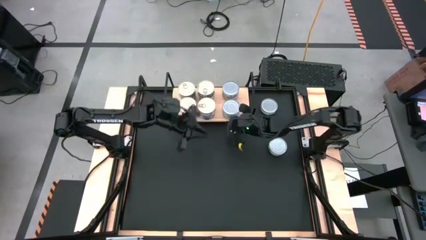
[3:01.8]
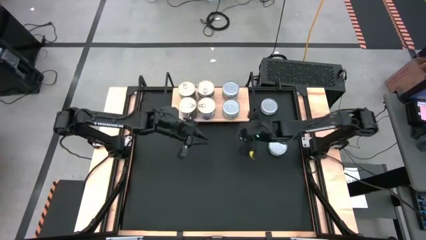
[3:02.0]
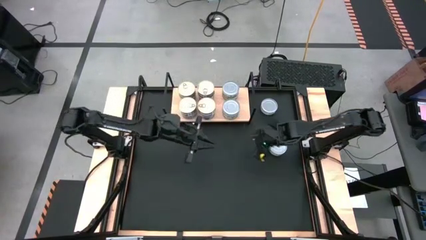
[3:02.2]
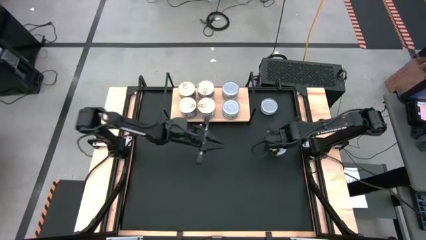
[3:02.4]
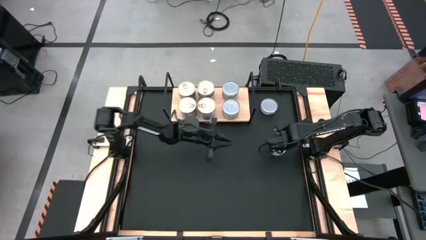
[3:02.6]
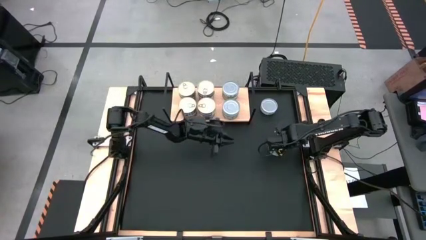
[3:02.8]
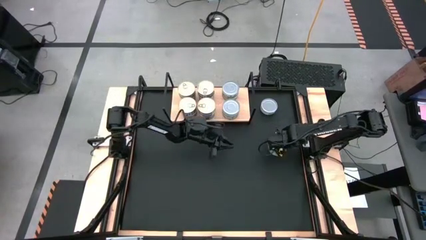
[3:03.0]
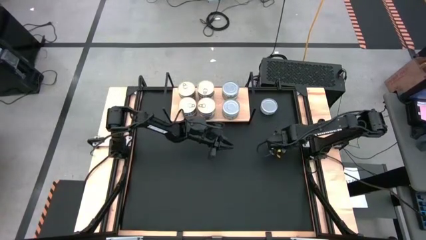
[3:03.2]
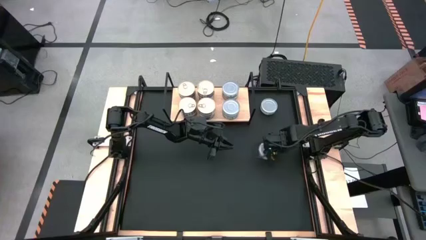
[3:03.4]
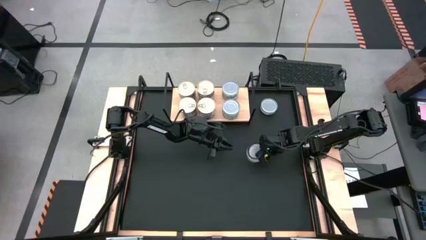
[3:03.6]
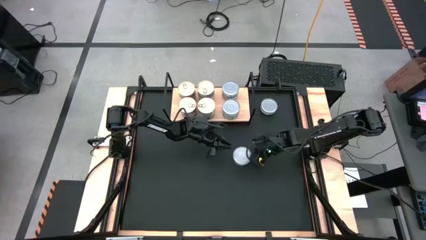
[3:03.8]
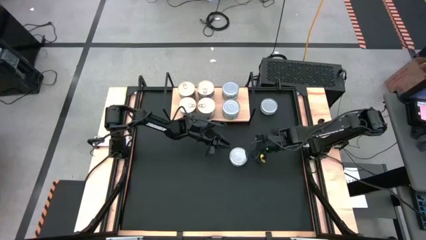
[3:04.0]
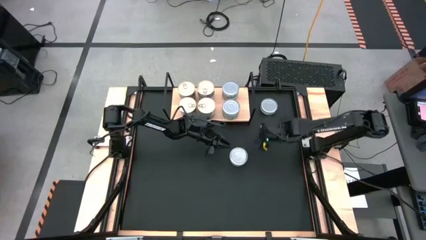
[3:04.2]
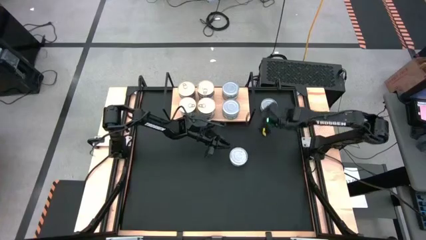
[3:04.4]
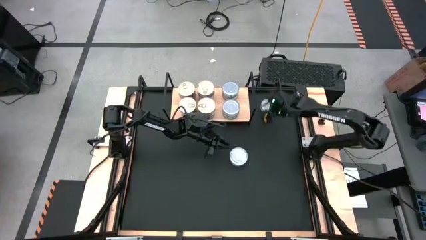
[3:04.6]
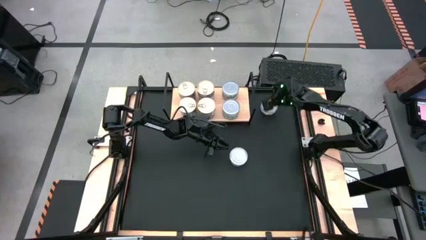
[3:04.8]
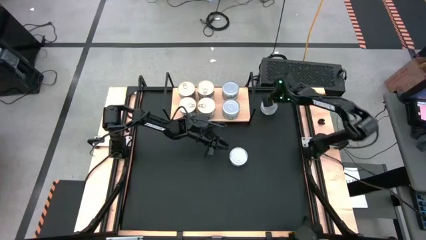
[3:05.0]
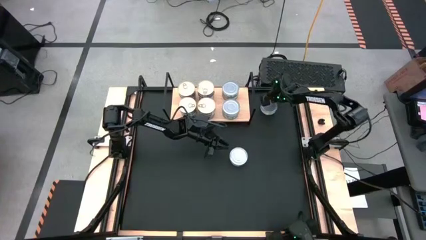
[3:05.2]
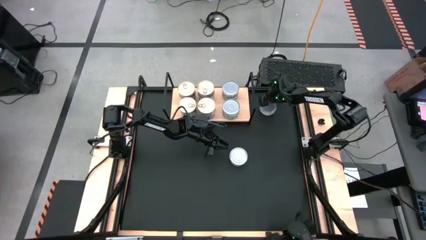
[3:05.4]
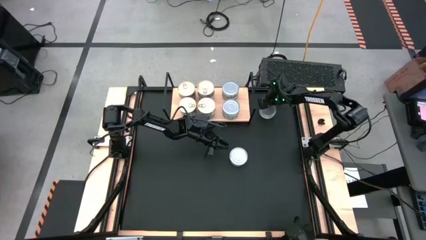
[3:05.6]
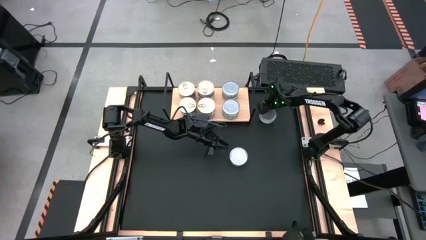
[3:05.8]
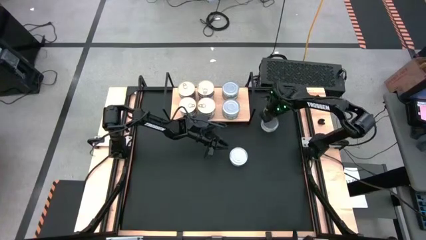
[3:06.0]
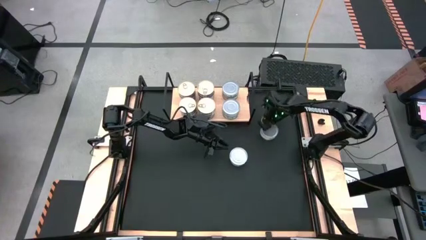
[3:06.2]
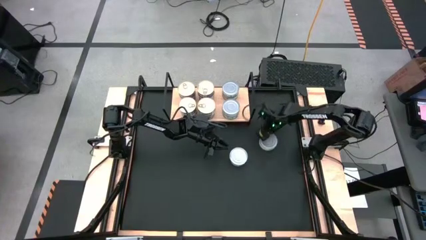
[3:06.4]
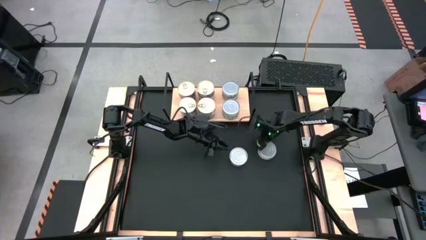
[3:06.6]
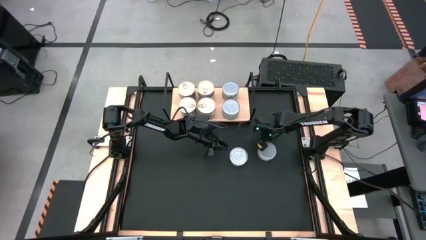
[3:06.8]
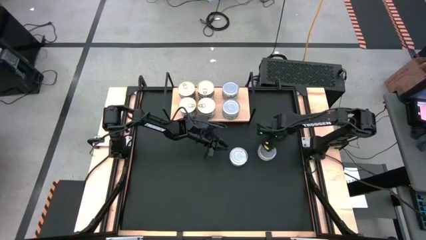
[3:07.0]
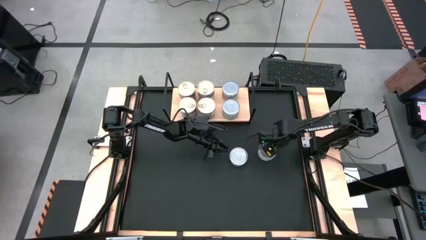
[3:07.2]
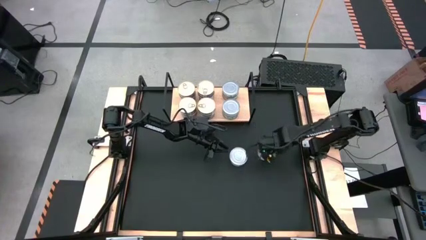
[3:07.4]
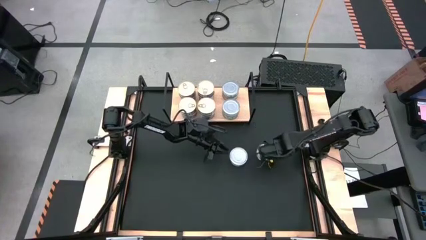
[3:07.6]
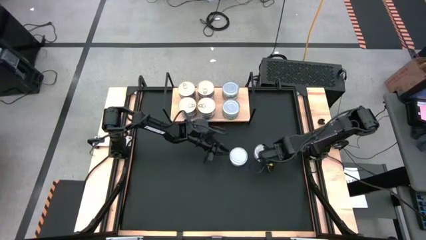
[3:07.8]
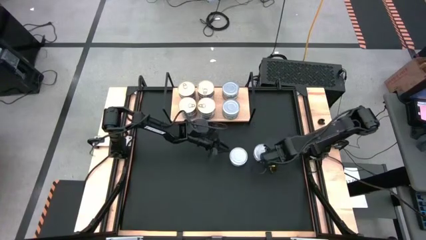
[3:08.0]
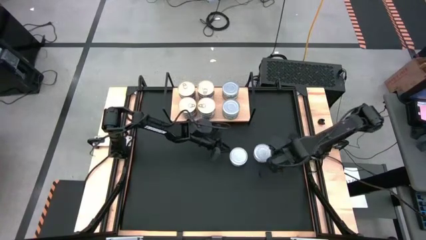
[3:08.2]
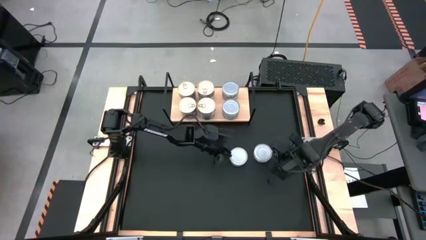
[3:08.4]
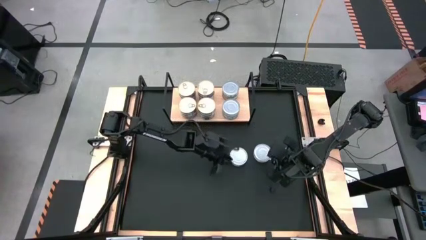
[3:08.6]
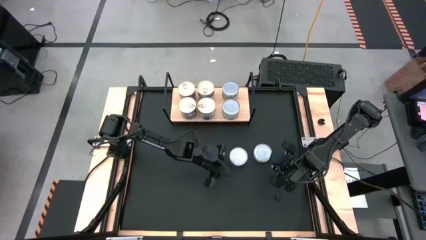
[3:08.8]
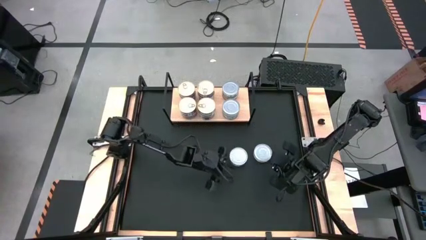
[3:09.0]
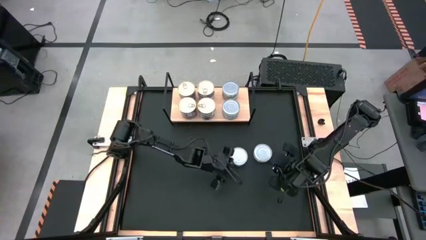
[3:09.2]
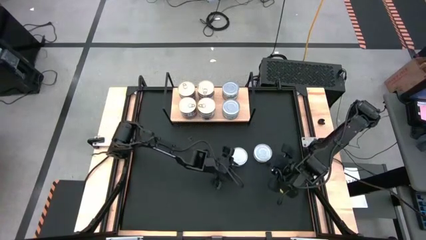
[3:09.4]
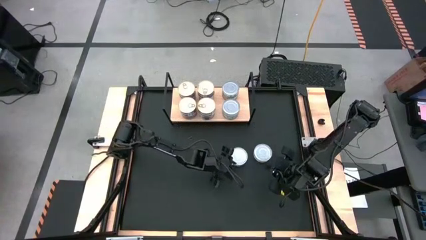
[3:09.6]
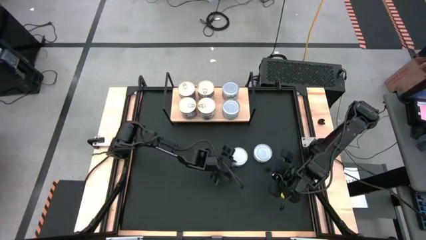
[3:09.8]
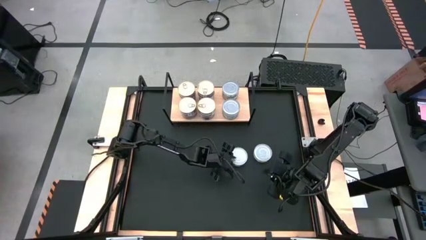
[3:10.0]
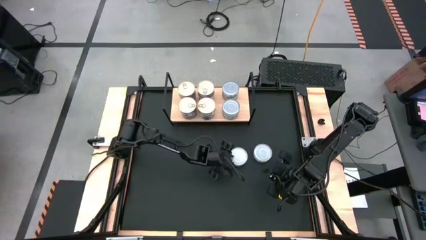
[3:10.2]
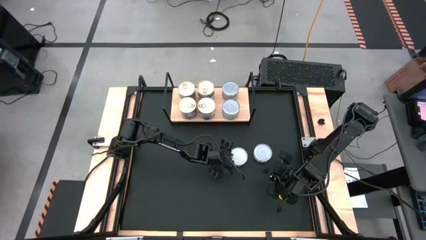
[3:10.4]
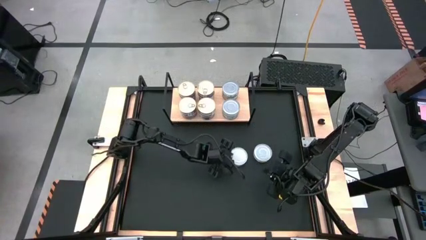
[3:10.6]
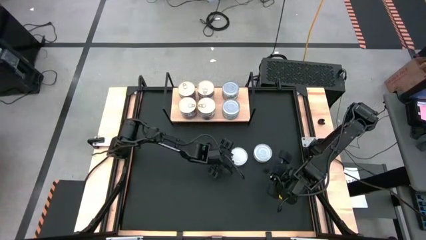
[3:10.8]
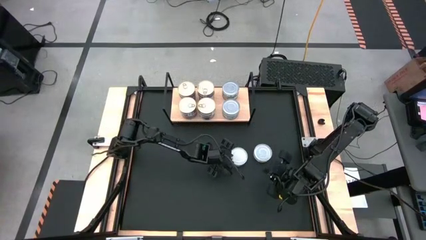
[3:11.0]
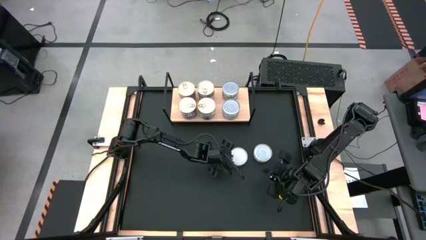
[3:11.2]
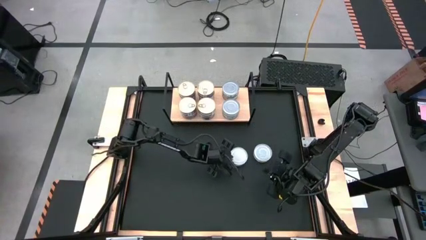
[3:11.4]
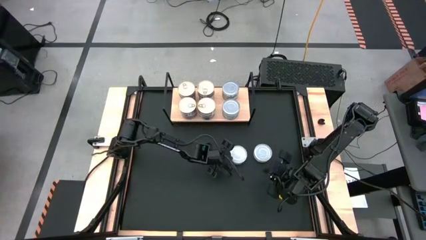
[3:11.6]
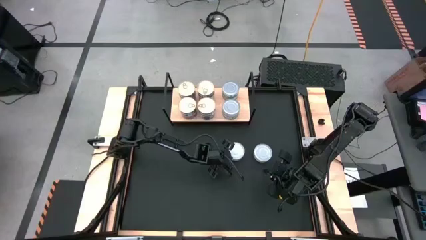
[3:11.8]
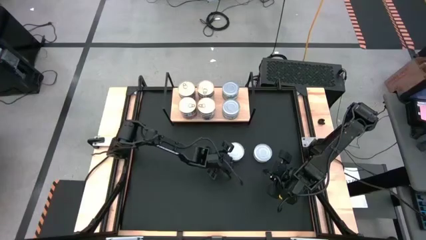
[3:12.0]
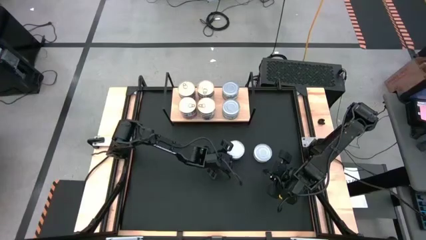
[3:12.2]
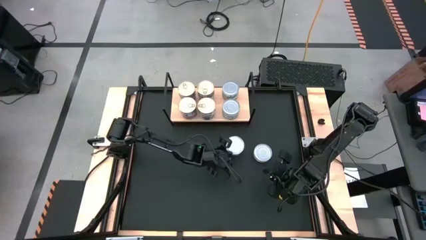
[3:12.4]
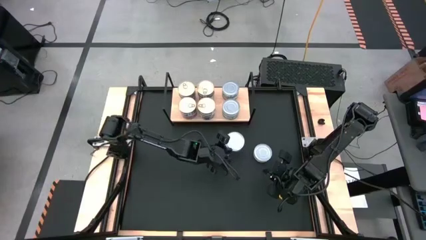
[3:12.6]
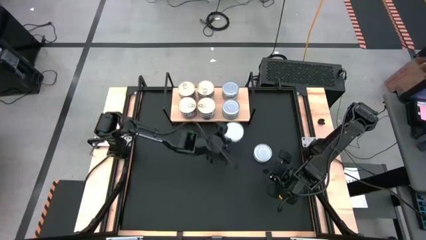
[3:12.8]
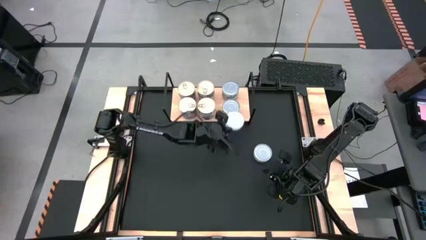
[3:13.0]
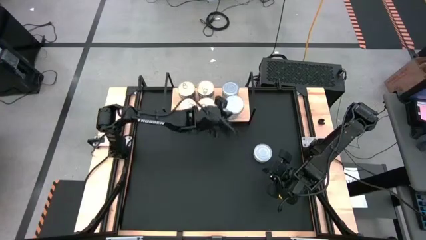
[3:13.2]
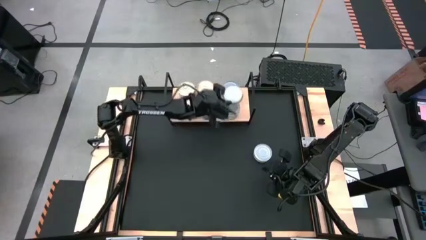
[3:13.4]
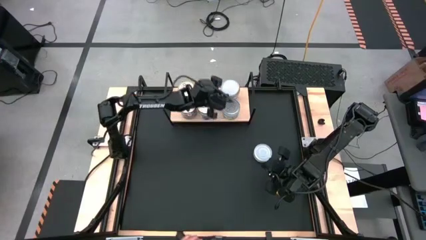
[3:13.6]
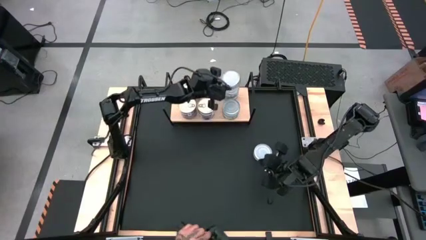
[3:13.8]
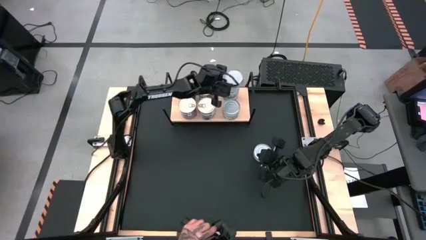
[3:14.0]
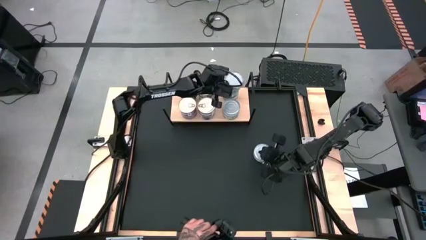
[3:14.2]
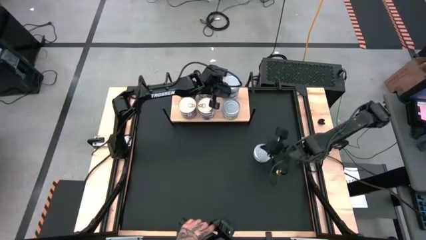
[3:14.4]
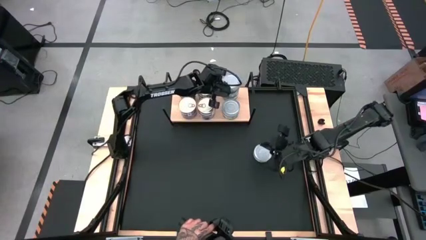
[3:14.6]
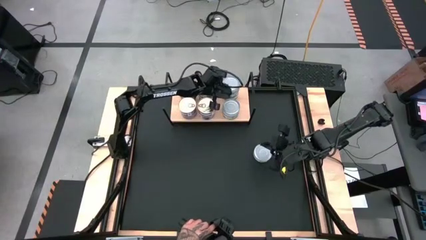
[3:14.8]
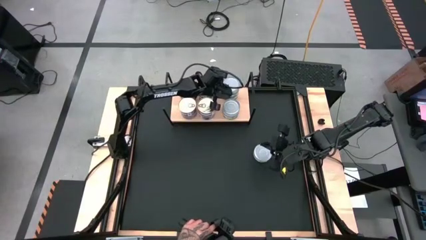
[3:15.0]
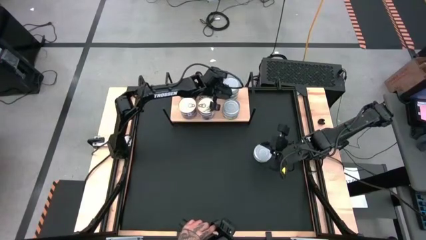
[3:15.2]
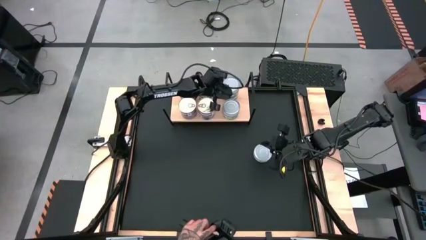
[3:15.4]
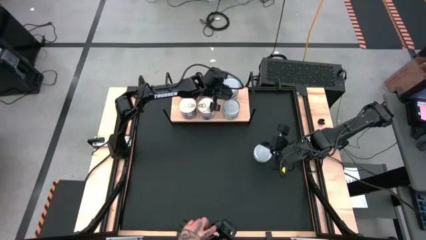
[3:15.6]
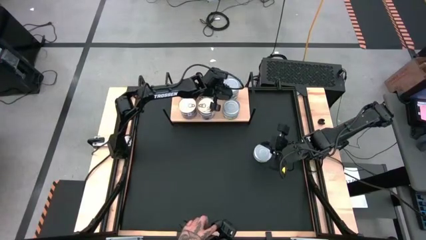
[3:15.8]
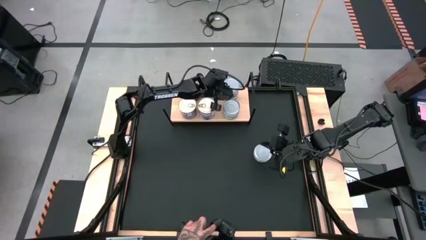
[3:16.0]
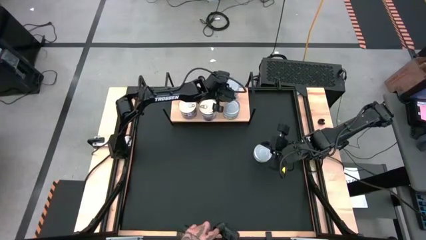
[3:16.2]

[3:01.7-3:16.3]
Task: Stack canned seafood by type on shelf
Stack the green tuna can on top of the green tuna can on the shelf

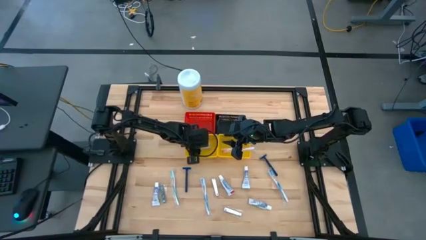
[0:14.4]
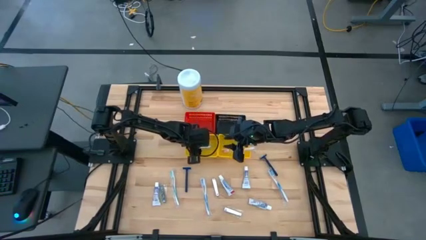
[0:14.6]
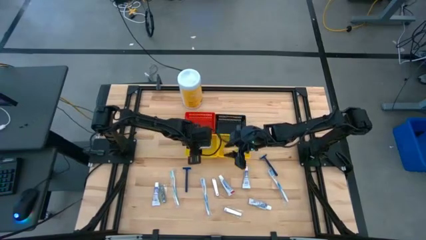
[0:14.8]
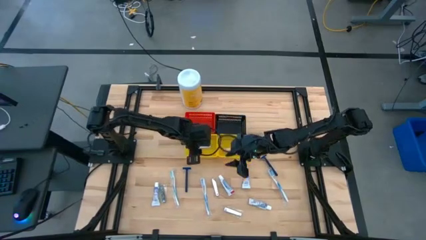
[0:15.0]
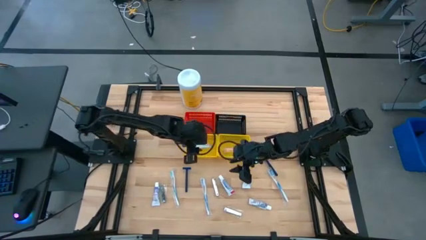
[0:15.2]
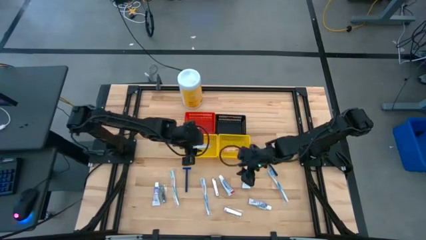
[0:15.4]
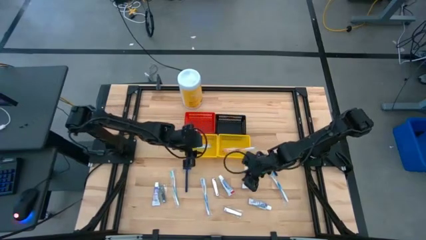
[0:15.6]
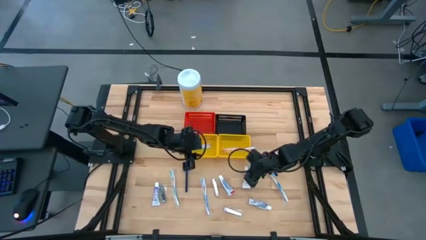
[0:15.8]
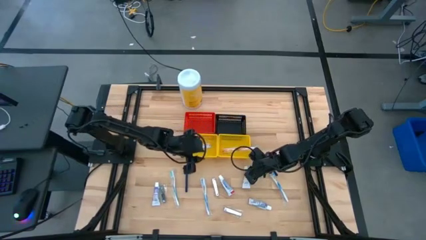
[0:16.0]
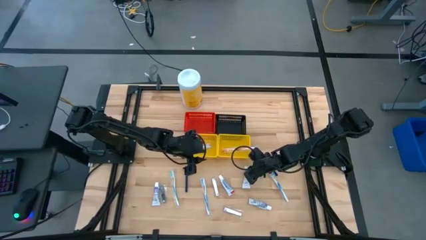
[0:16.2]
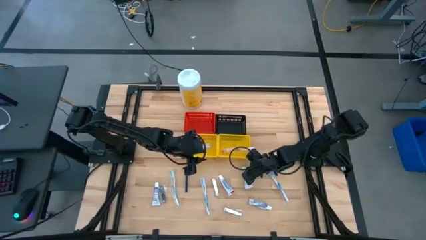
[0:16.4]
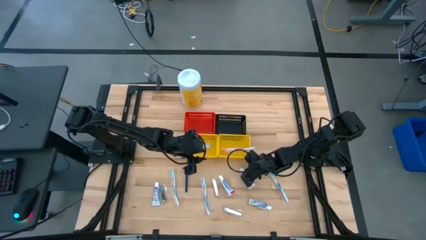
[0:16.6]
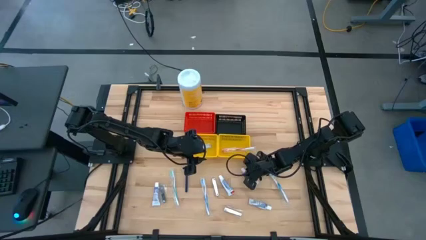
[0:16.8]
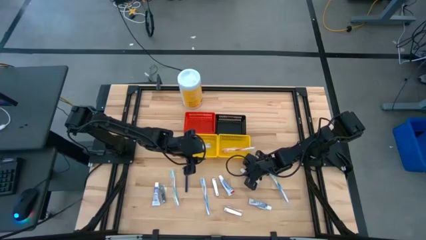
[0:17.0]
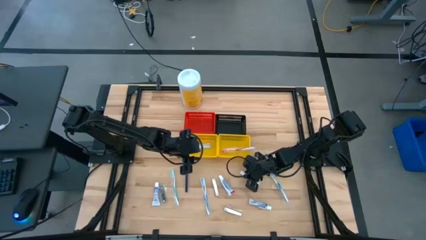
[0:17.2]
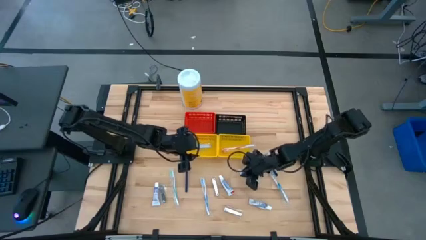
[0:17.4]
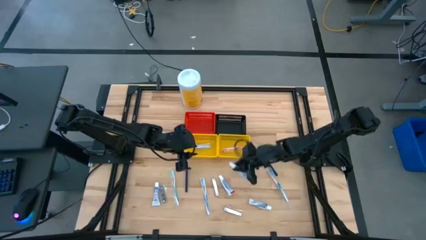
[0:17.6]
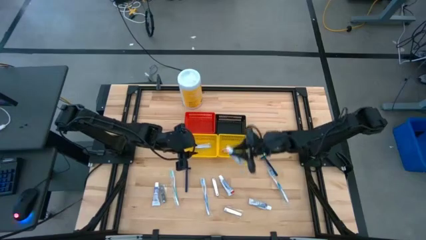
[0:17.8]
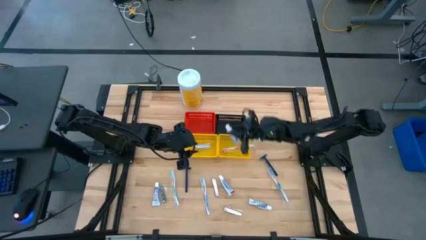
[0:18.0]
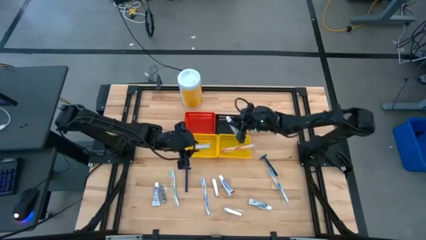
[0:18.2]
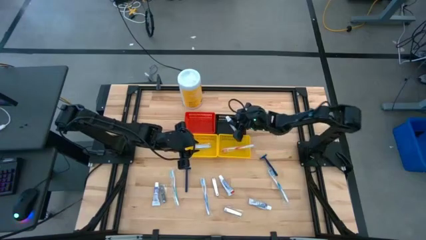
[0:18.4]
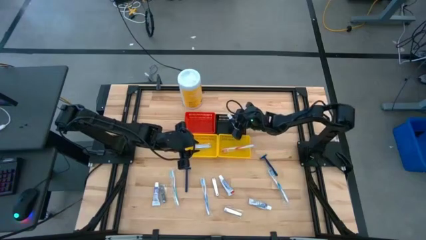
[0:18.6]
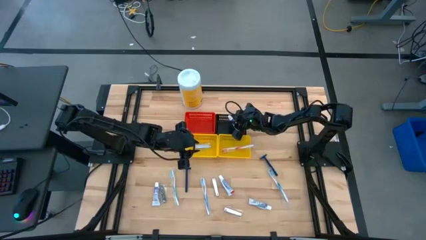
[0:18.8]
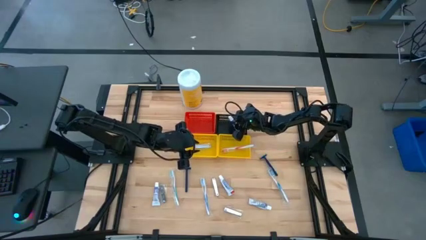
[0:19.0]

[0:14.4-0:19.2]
Task: Pick & Place Travel size toiletries
Put the white toothpaste into the black bin
